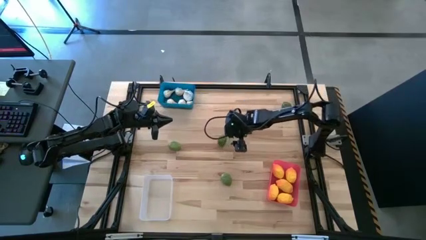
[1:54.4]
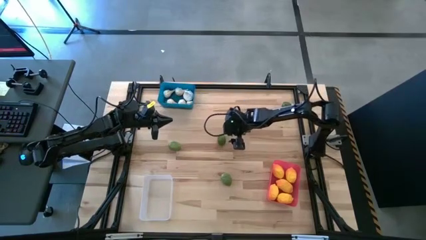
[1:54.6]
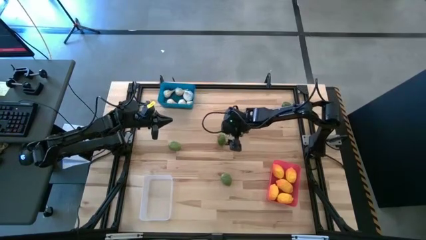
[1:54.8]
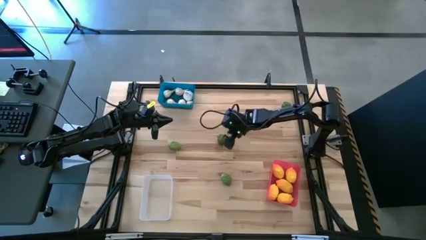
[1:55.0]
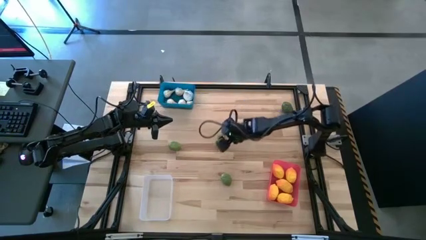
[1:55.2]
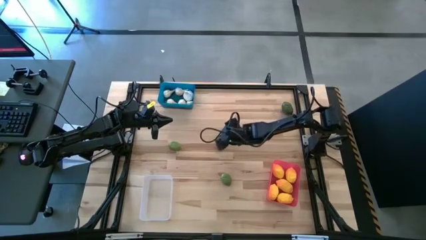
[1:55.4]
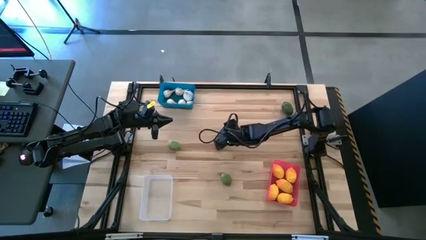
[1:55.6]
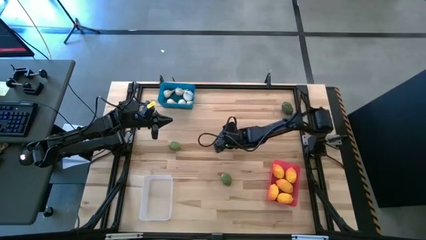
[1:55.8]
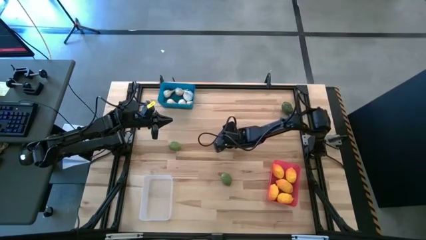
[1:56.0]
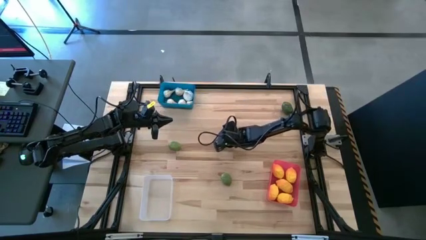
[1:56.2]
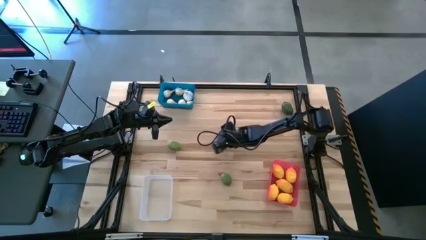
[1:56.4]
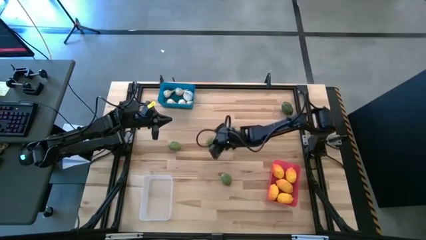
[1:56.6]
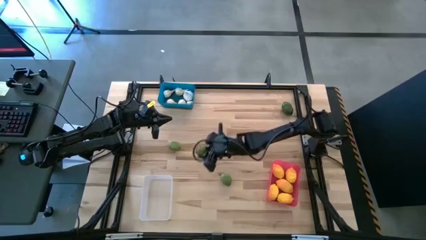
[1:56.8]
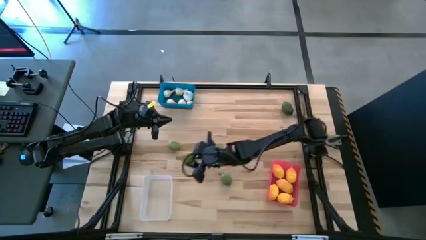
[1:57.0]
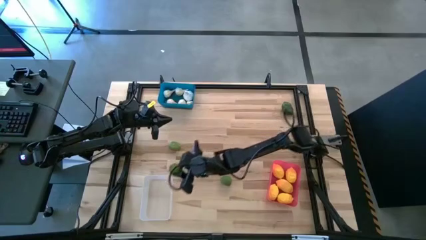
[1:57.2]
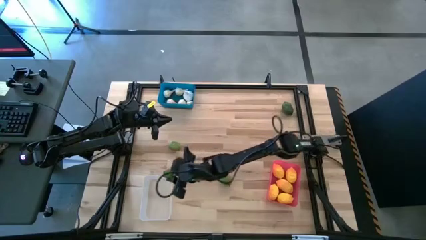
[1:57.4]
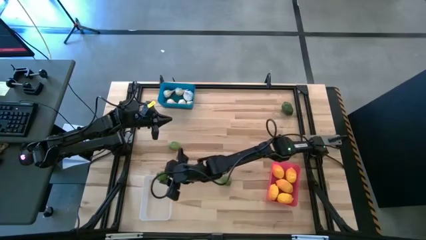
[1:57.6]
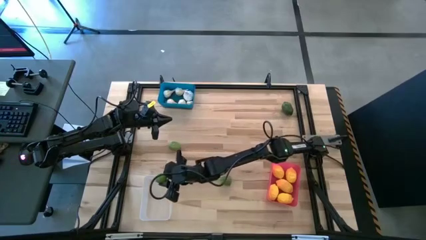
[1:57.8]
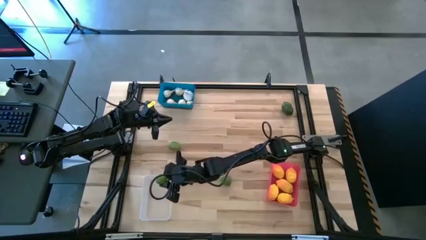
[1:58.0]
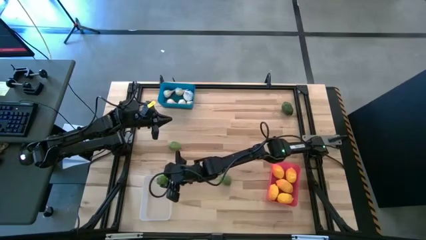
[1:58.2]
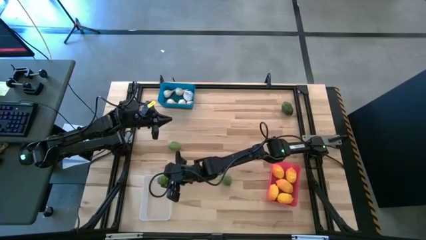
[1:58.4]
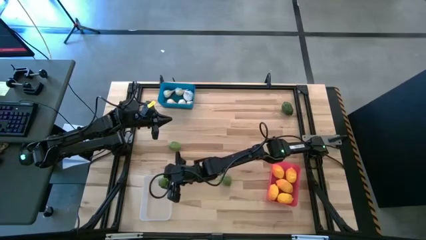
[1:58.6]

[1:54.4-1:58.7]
Task: Sort produce into baskets
Put the lime into the transparent bin

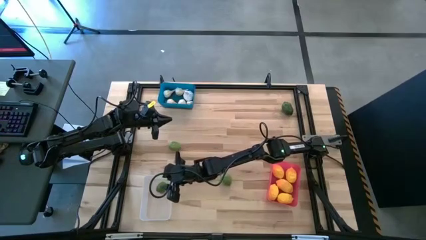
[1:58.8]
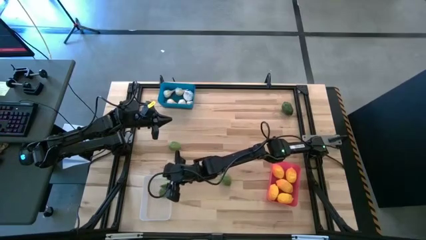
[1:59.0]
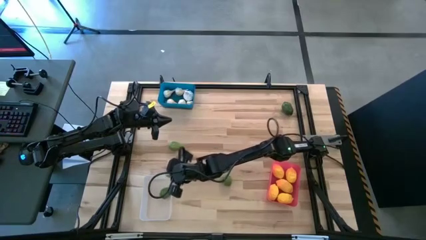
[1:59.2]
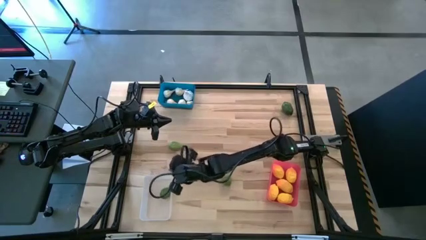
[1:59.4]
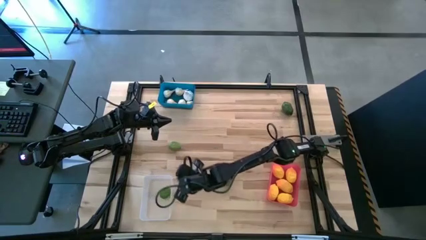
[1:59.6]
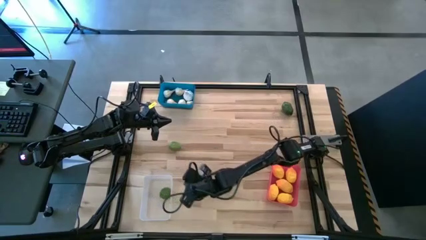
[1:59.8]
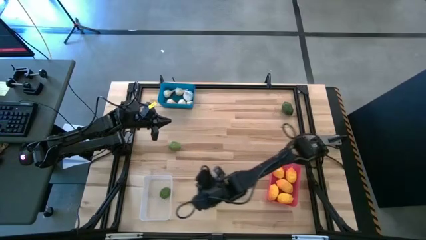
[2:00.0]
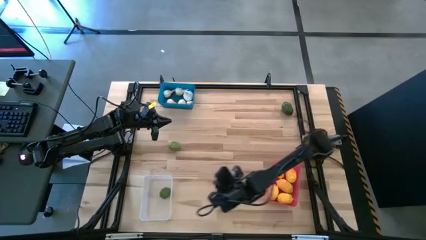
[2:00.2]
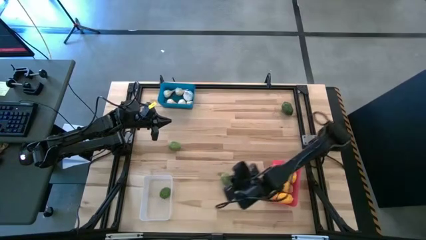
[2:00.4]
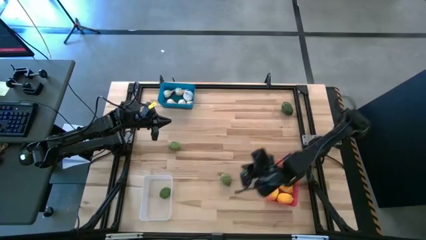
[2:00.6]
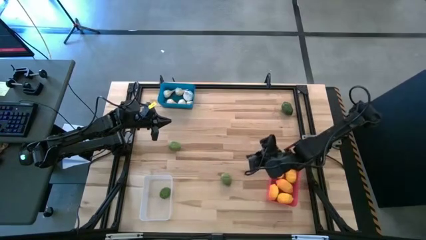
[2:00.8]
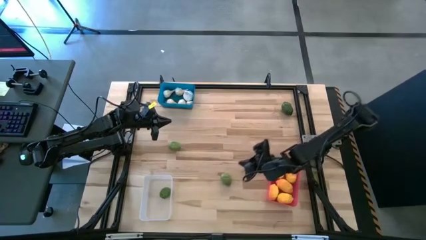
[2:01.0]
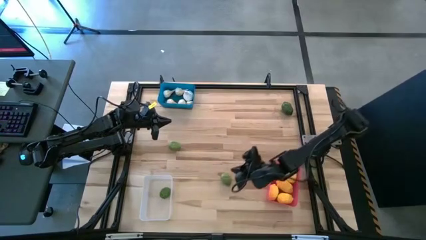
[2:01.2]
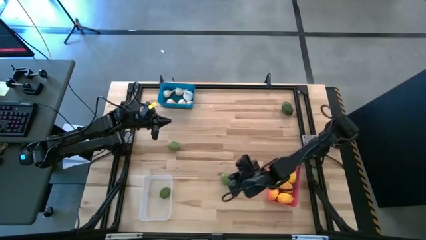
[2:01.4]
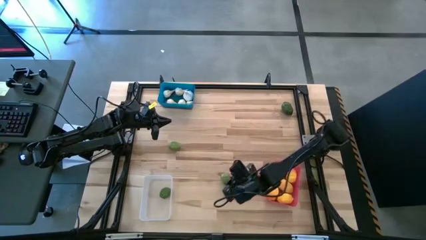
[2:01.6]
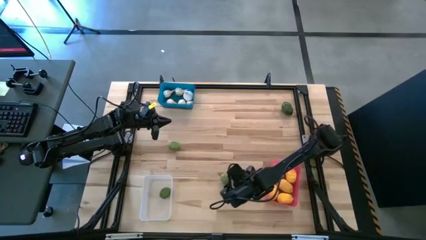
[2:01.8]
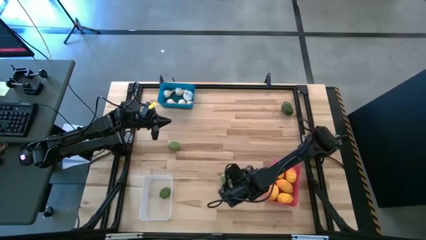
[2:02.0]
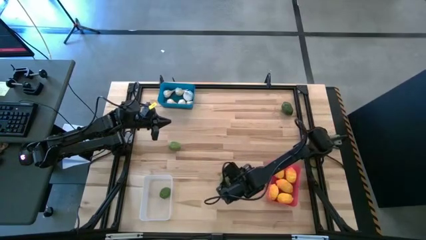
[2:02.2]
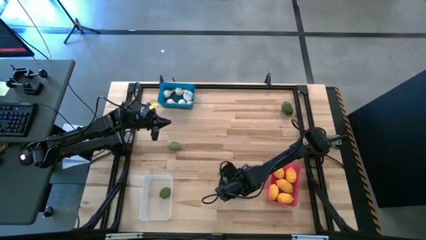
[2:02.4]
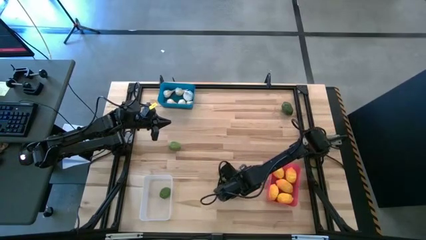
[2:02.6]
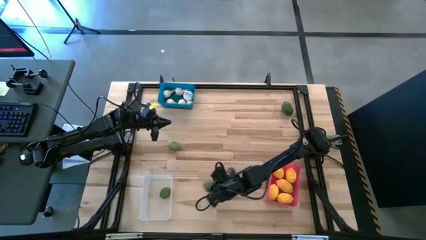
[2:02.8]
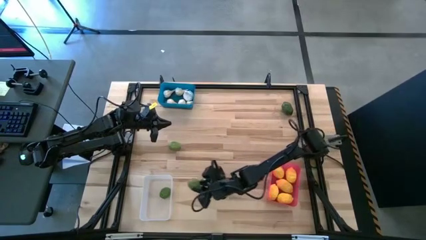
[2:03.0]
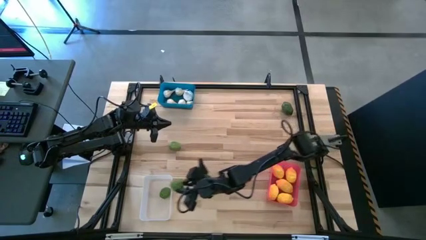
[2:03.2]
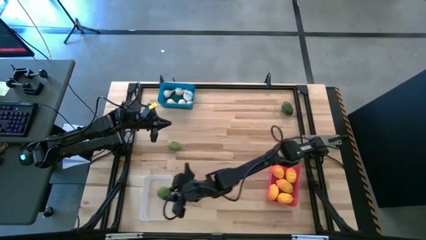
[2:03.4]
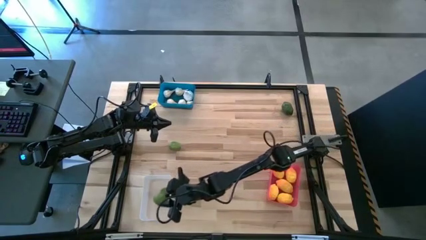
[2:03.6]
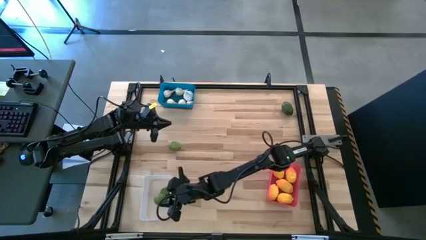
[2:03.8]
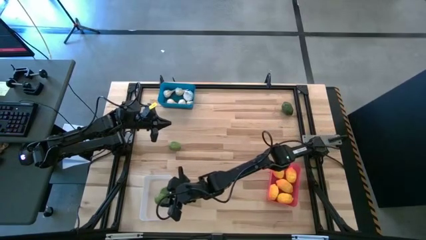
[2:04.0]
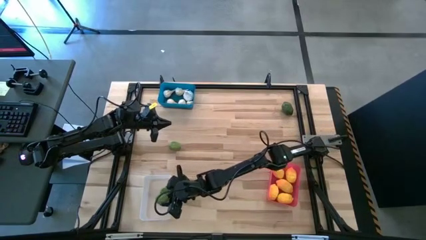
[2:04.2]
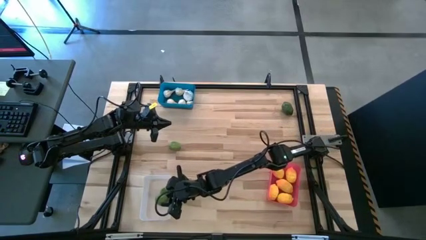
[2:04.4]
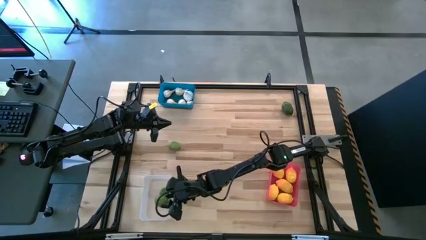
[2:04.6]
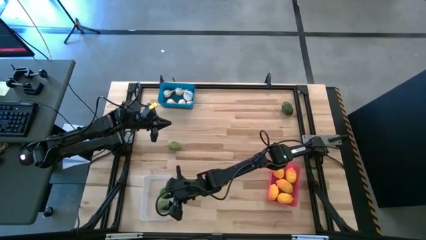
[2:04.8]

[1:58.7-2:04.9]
Put the lime into the transparent bin

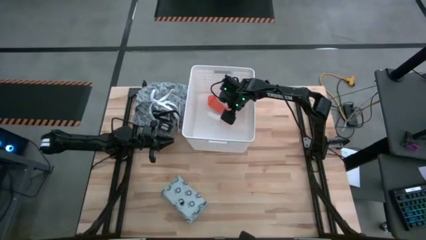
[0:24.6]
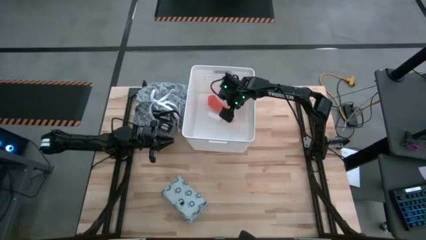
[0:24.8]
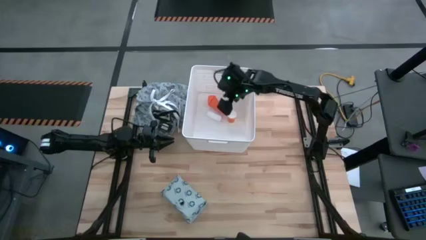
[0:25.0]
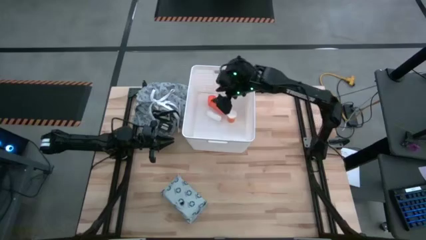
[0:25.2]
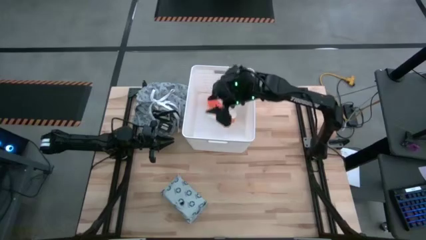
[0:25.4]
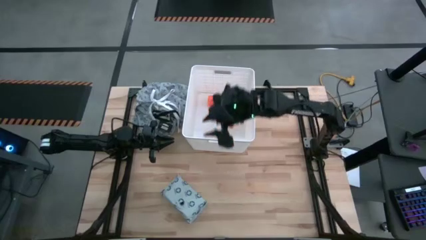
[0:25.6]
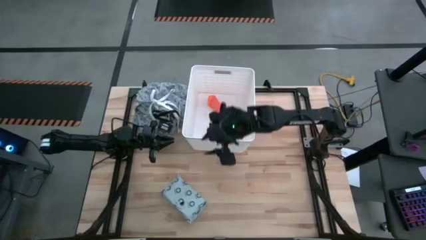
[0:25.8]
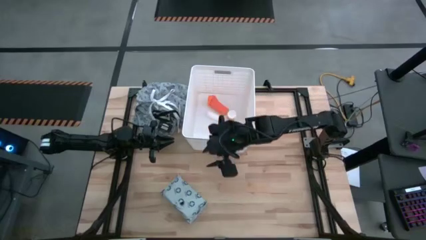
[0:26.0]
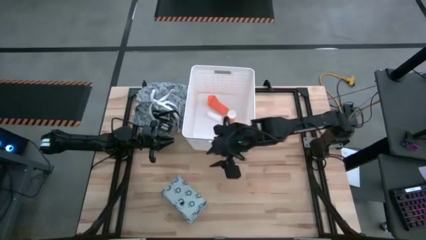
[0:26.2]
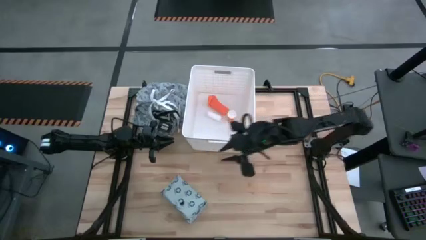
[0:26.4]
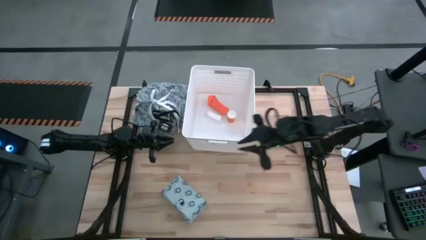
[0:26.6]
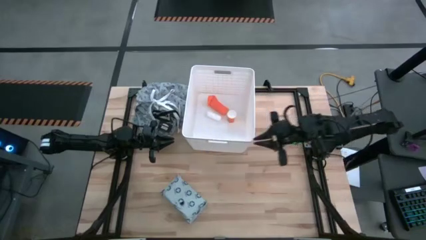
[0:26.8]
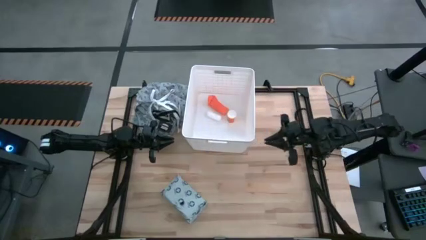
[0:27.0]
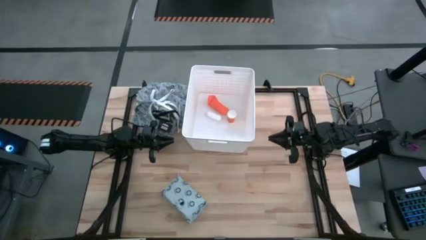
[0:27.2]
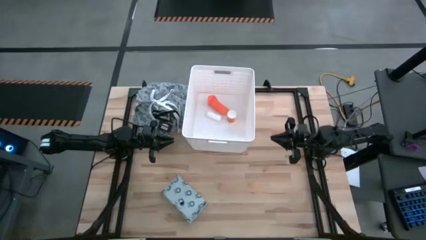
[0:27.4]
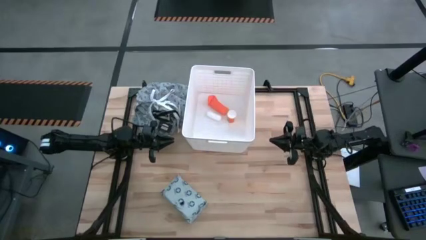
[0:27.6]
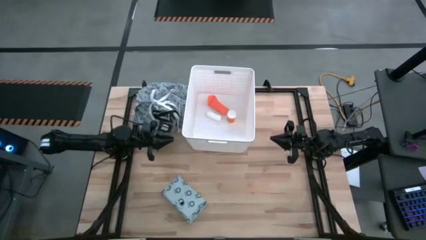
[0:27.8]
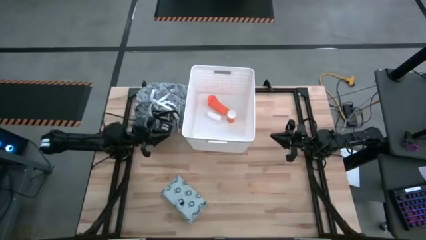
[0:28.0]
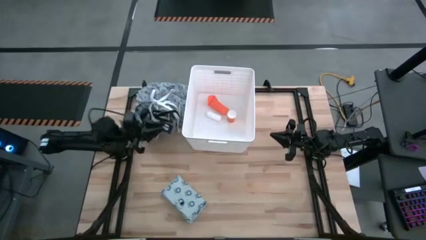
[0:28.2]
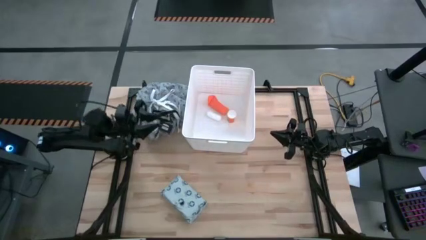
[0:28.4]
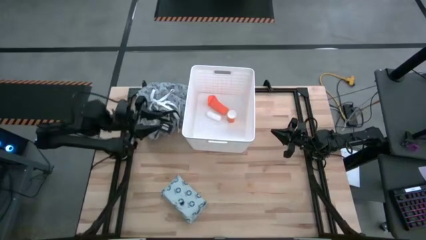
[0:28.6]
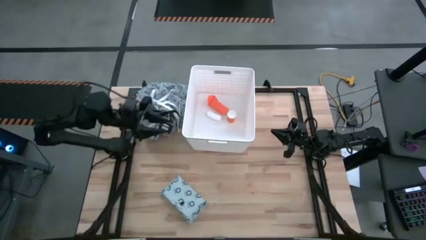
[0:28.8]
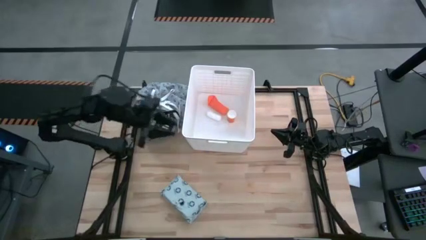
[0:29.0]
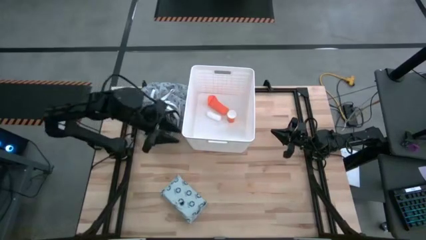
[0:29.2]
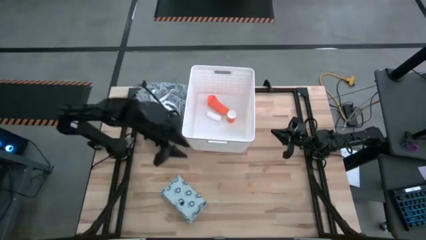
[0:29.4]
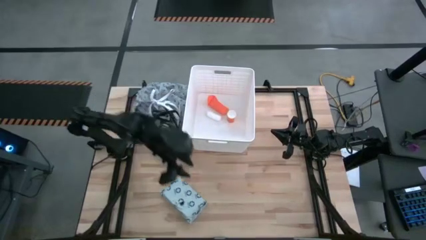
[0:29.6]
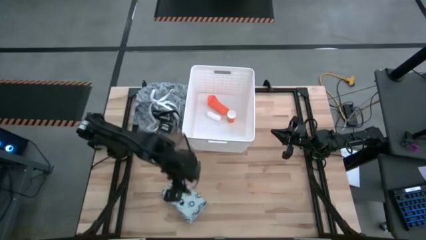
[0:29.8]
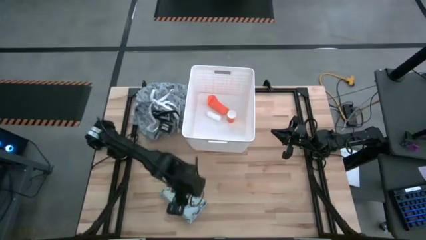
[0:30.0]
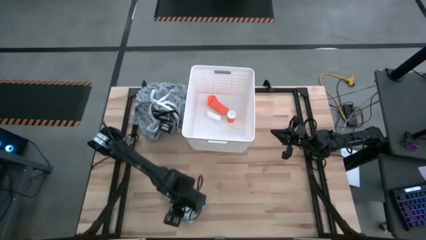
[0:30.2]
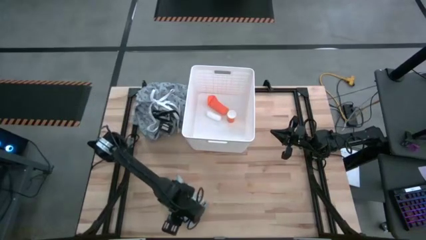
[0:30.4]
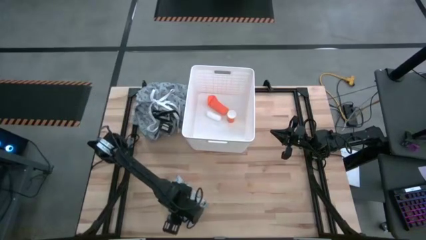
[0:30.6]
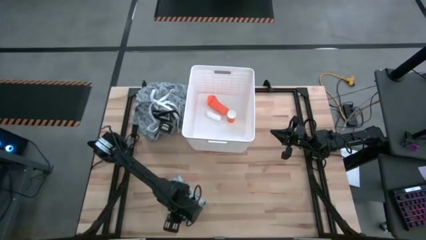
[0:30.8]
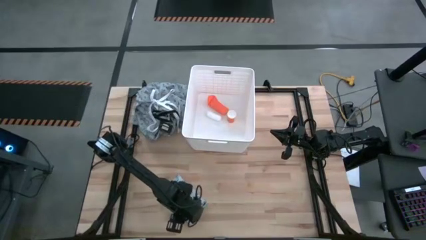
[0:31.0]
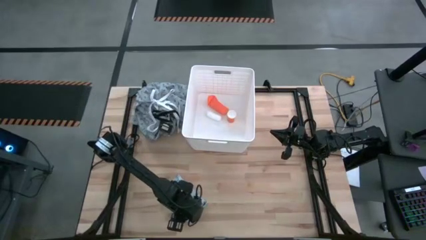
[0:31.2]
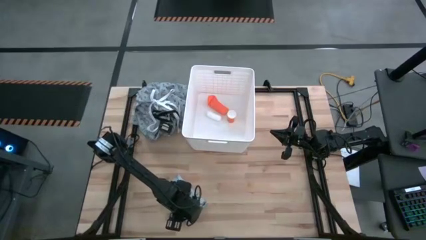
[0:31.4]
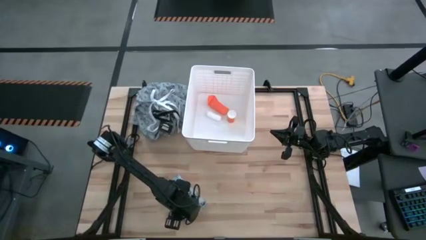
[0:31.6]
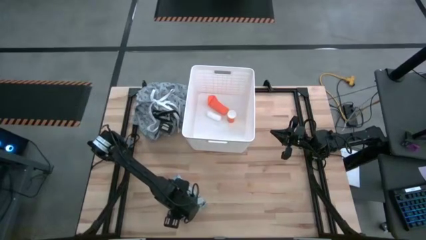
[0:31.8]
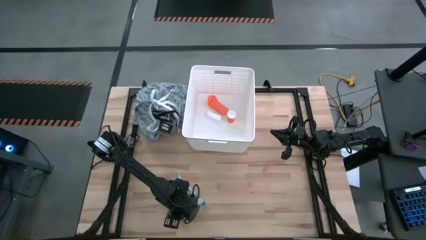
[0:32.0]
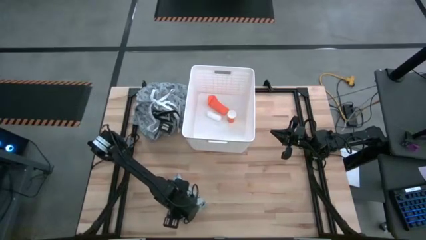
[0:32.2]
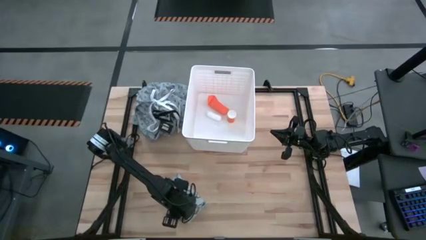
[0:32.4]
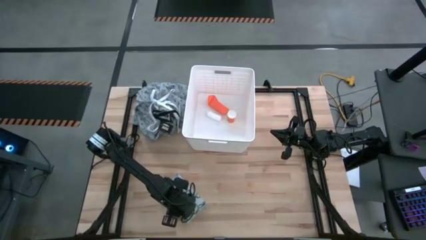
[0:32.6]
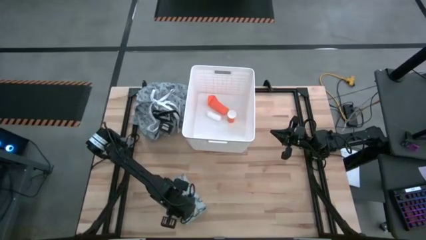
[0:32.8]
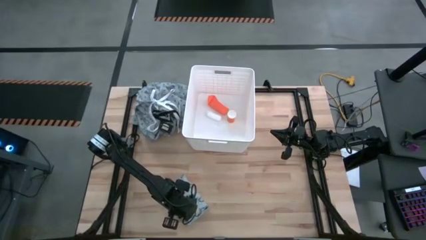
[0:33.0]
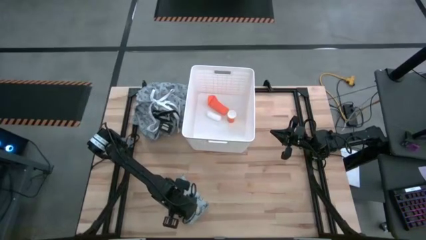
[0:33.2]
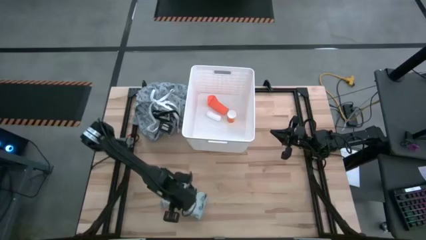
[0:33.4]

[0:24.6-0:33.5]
Task: Pick & place medical supplies in basket/bin
Put the white bag into the white bin
